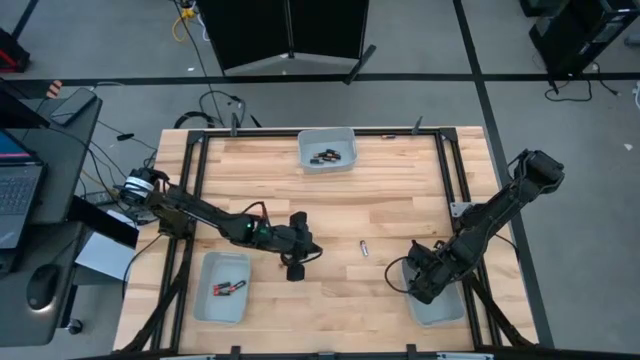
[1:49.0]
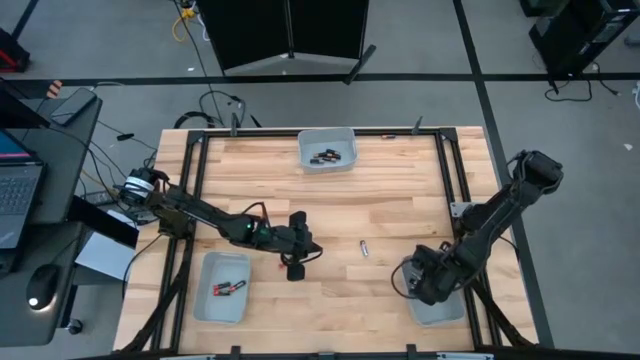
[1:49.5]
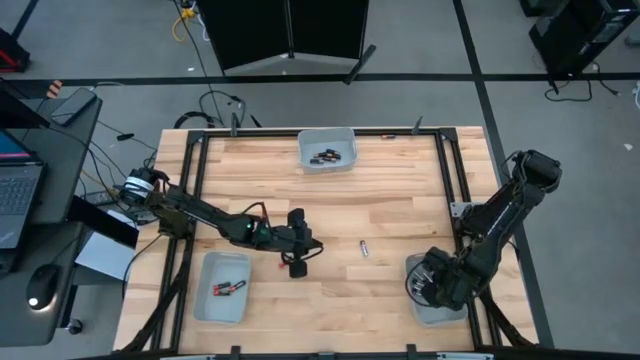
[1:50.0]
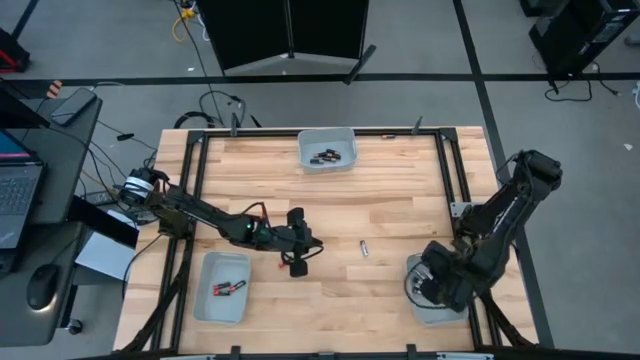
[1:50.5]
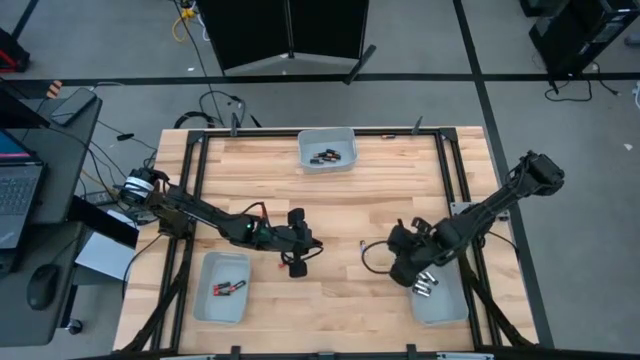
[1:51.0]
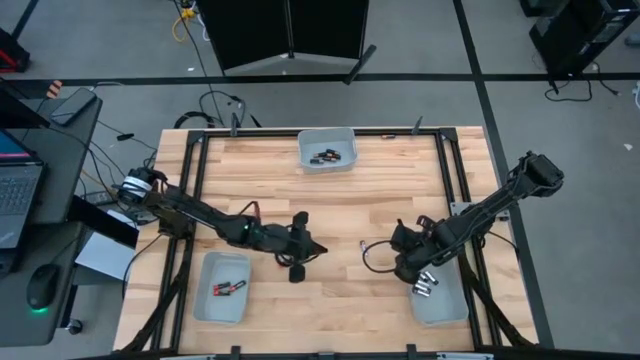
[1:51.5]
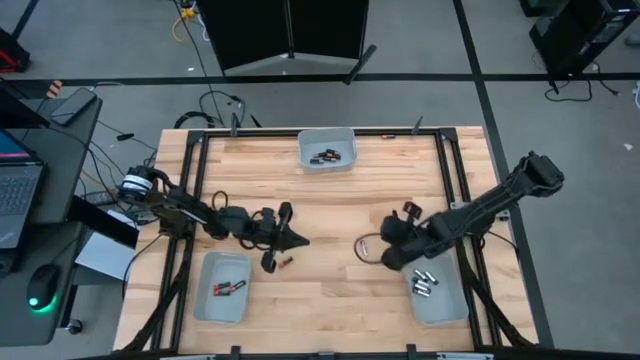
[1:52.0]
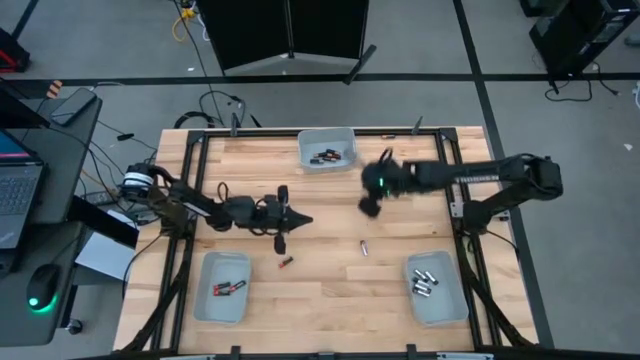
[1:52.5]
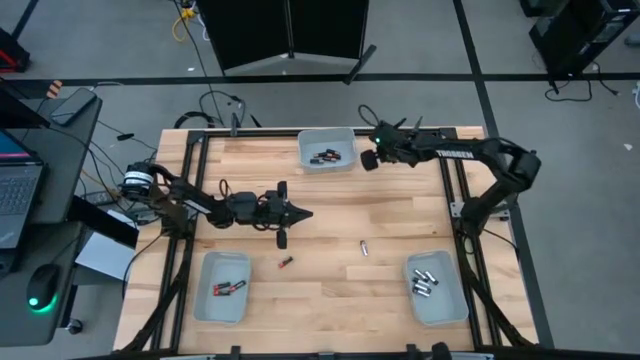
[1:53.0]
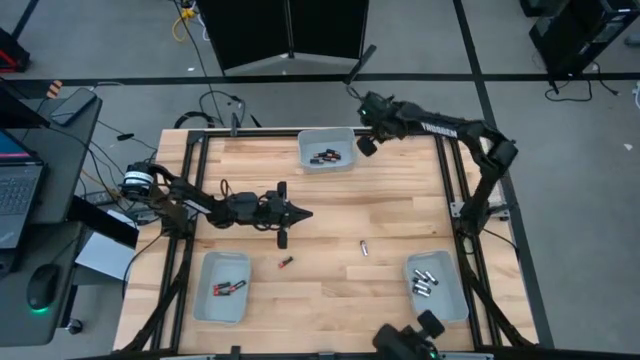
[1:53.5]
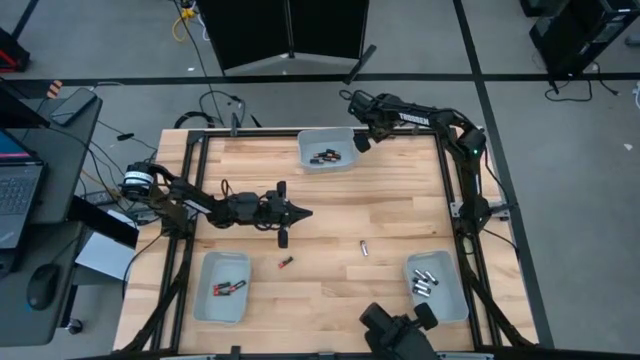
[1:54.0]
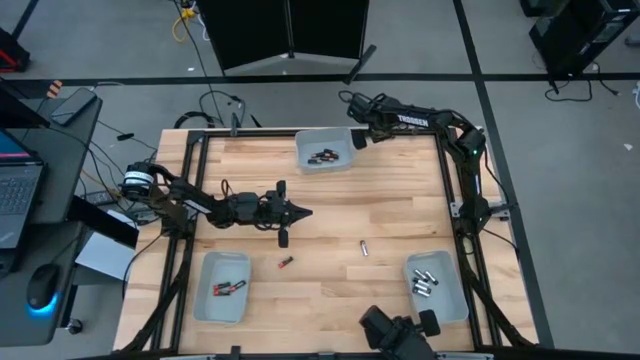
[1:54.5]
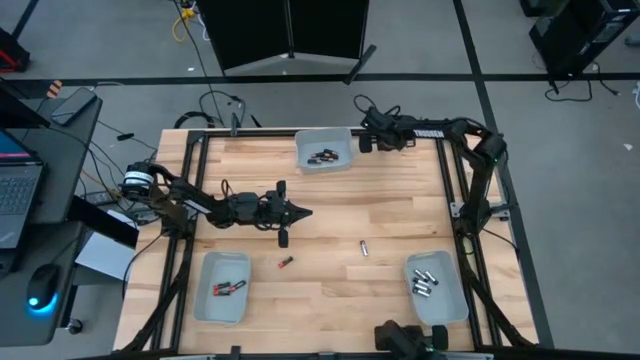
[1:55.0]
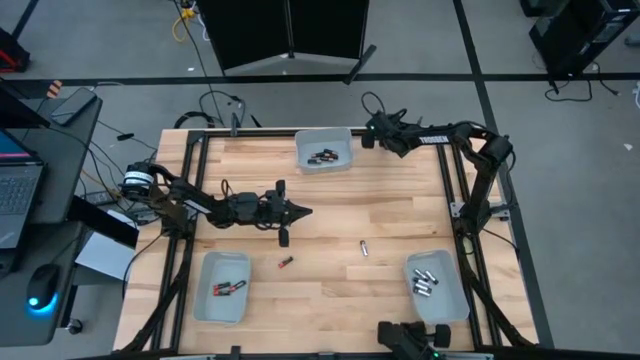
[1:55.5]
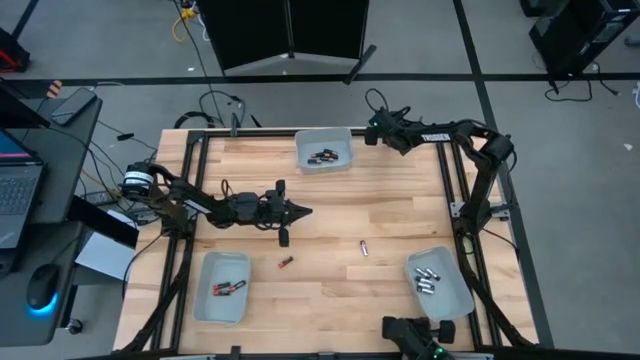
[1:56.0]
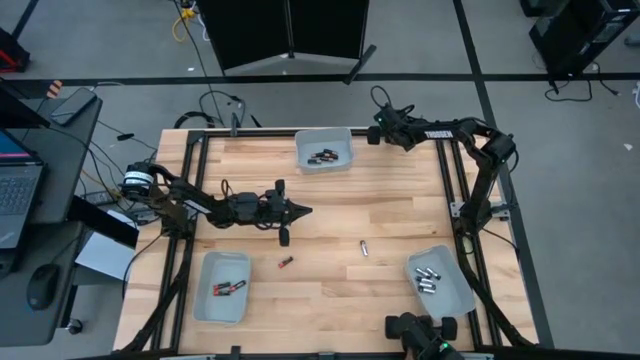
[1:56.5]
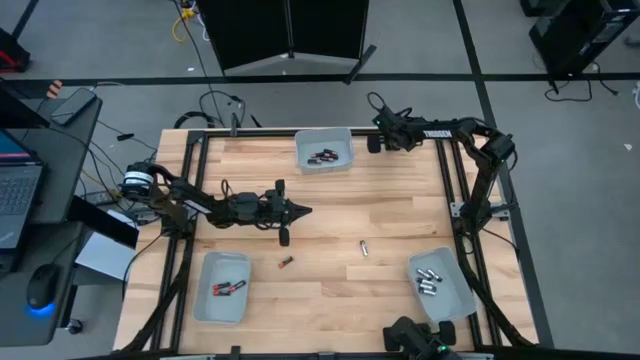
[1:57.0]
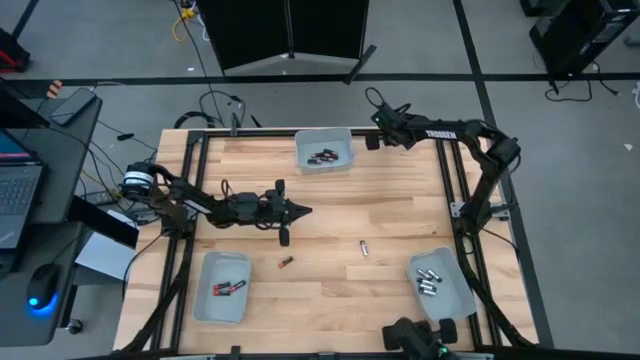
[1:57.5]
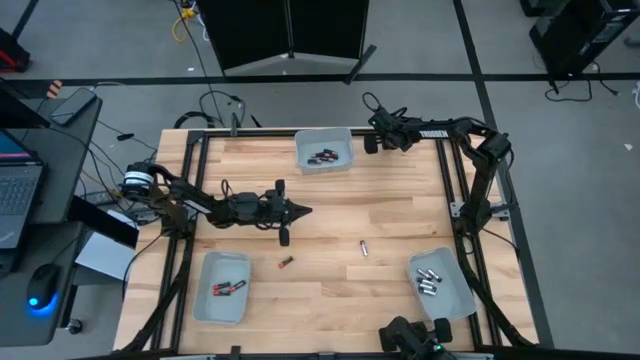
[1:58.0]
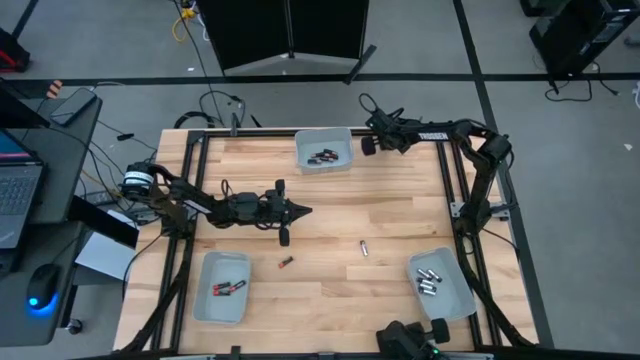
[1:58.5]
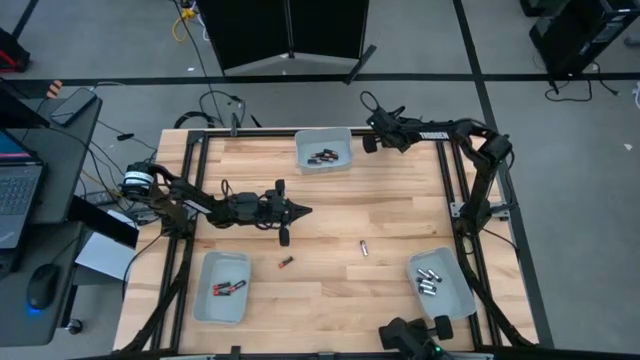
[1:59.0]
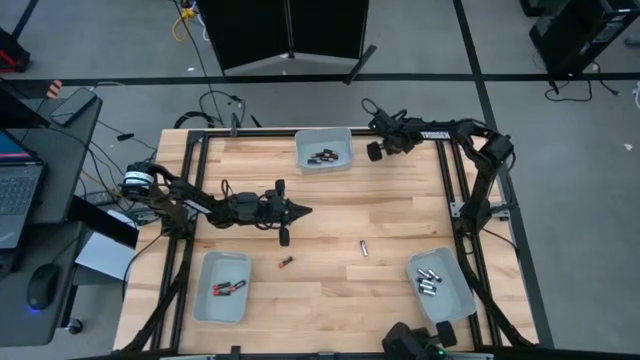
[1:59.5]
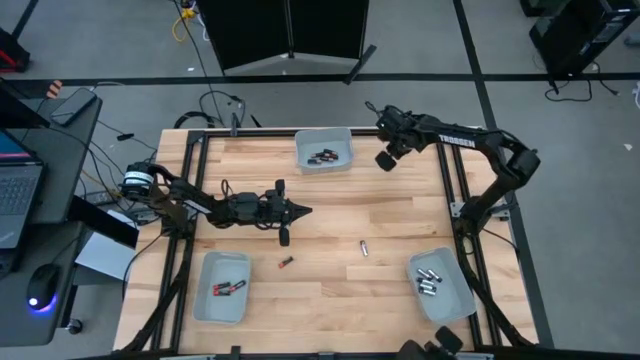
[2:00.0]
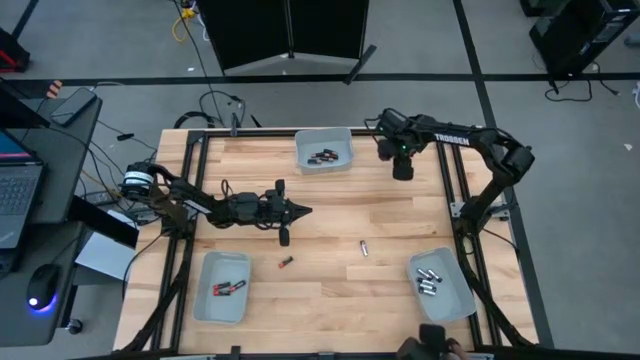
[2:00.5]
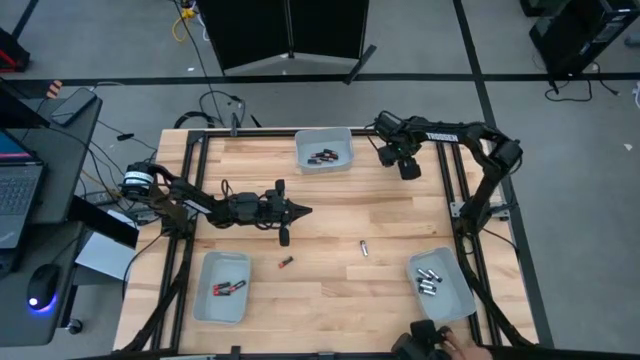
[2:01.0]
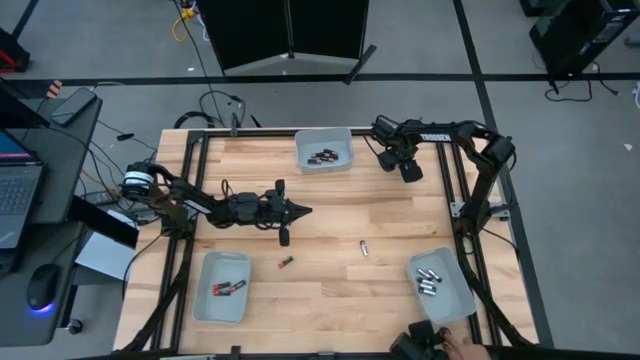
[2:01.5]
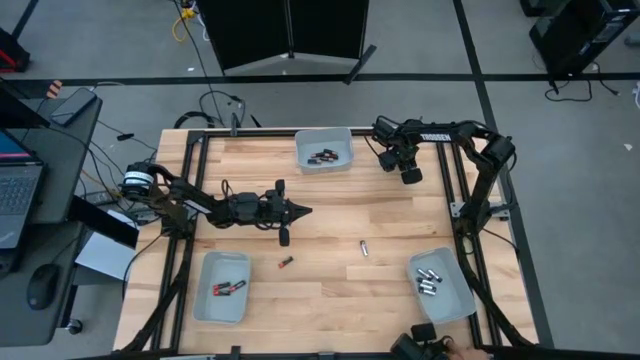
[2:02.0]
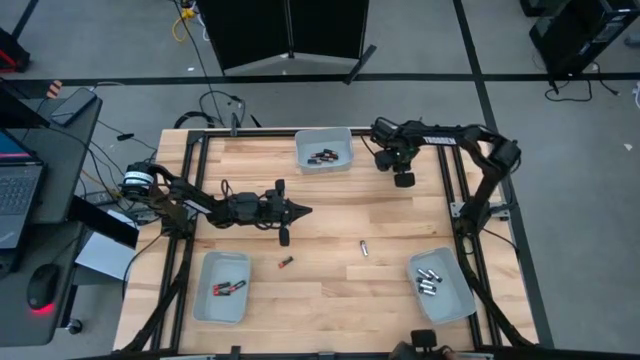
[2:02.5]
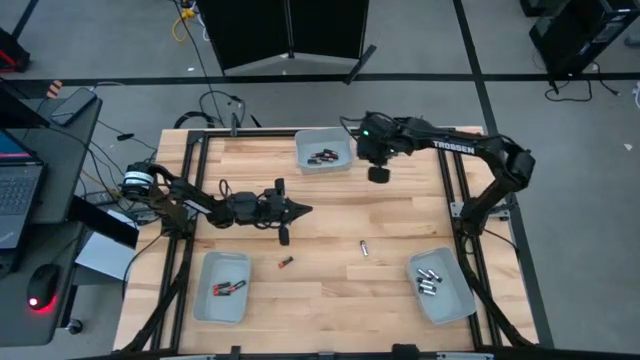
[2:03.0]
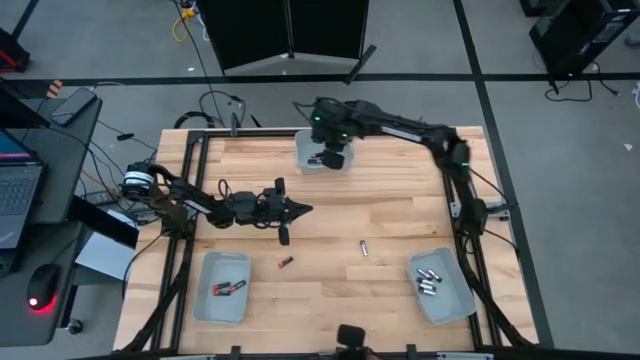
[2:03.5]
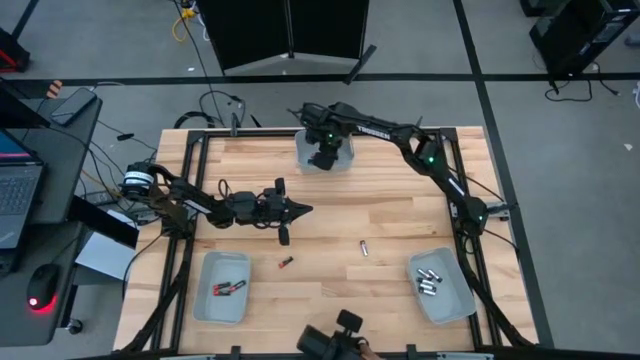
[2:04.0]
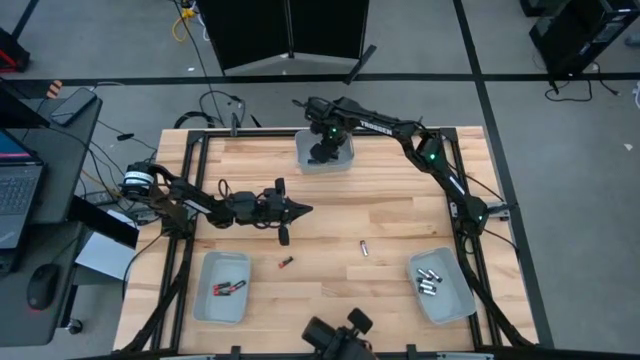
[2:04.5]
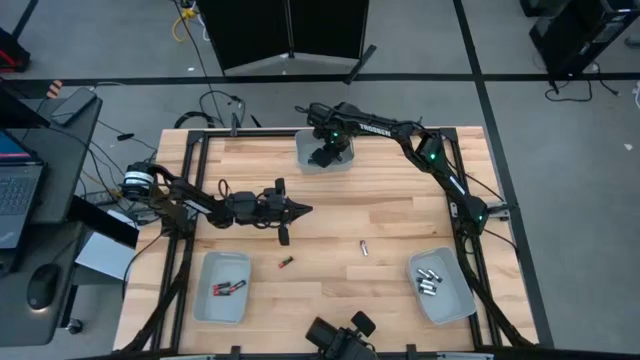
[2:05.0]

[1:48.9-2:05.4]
Task: Sort batteries
Put the copper battery into the top gray bin

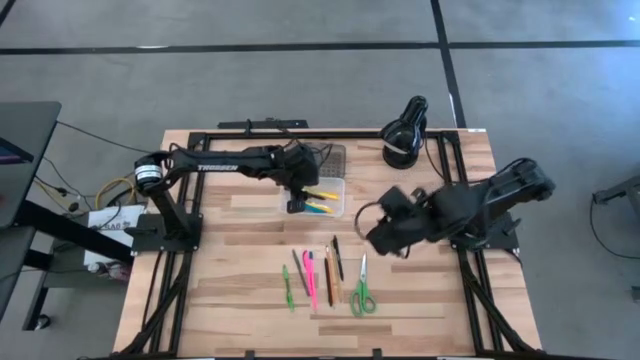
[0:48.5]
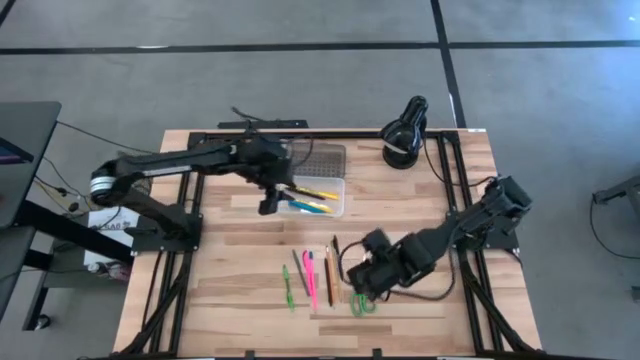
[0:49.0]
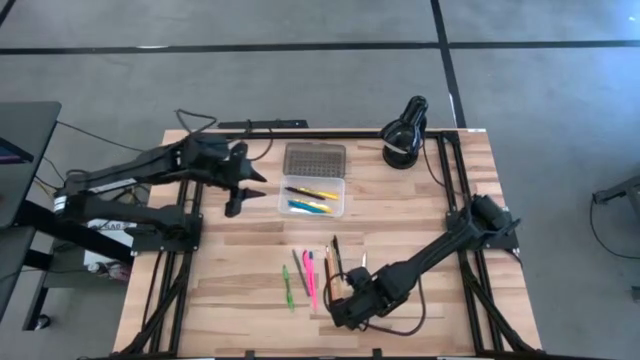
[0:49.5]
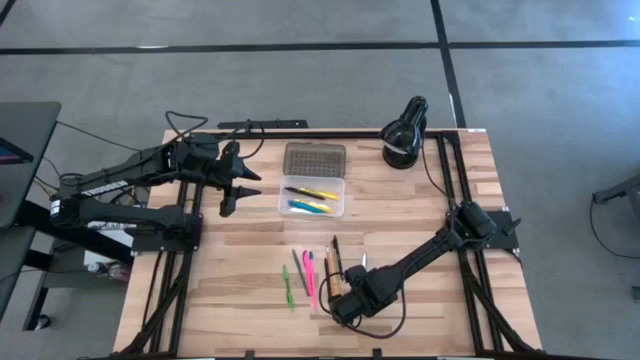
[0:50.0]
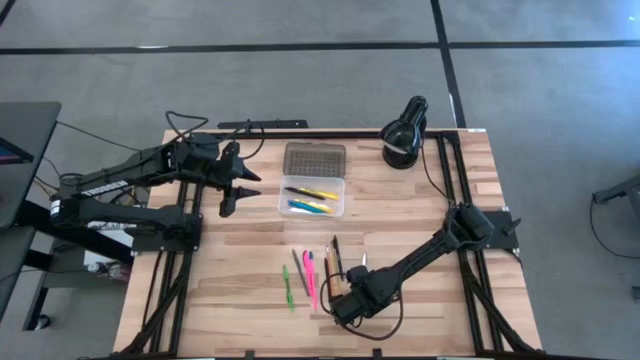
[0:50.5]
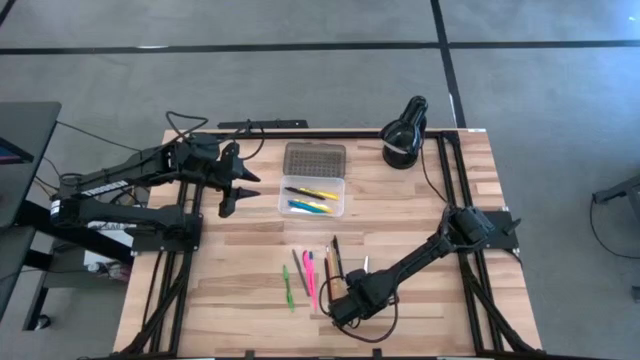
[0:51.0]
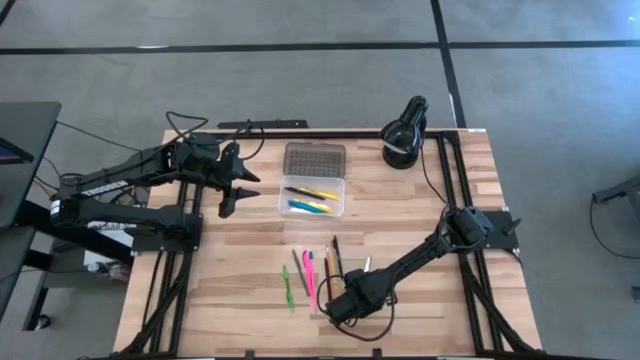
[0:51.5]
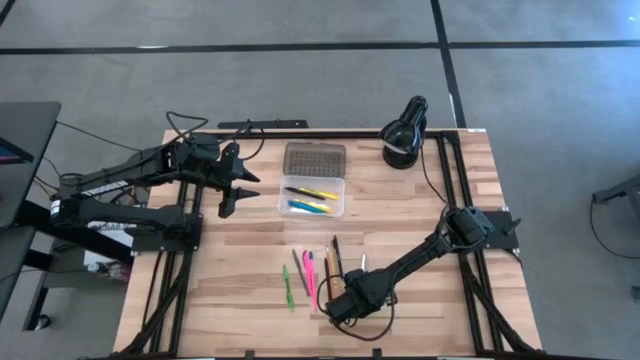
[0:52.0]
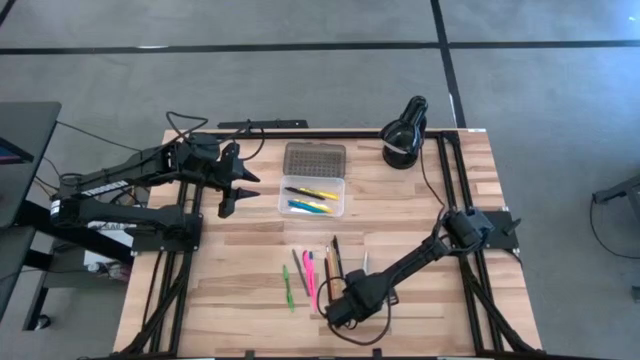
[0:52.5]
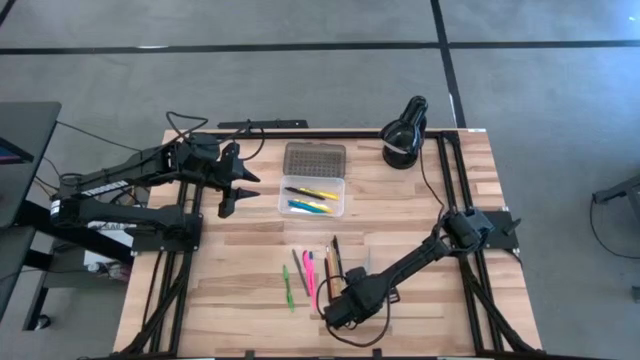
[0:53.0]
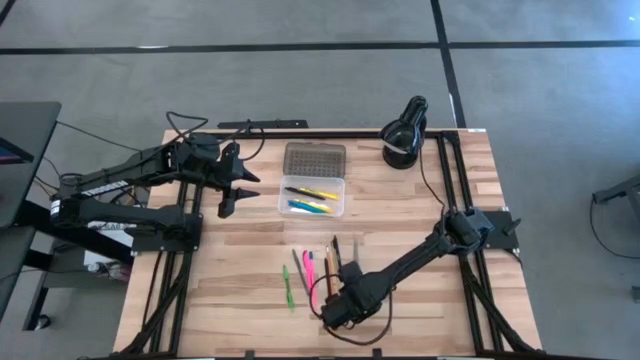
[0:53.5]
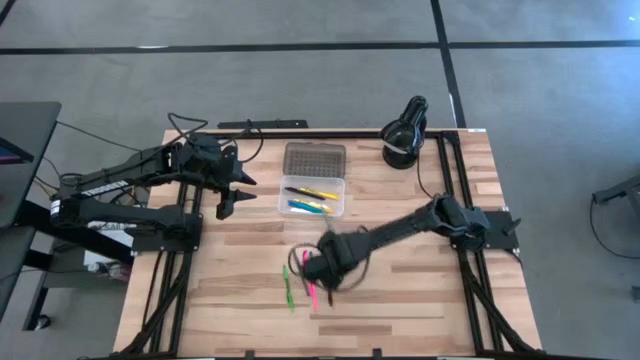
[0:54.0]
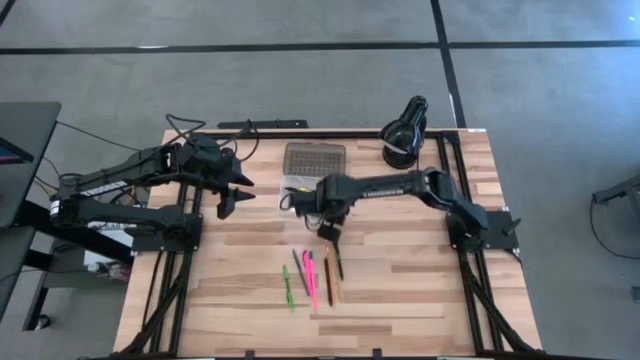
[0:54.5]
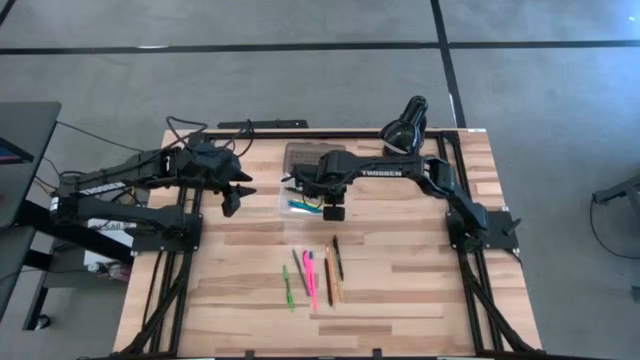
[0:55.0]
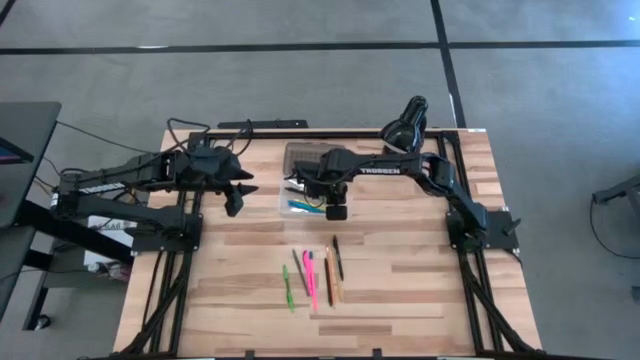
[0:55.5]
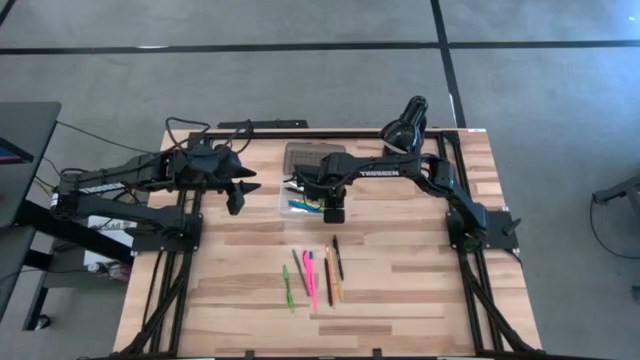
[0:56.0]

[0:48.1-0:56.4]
Task: Pick & place school supplies into a supply box
Put the green scissors into the supply box
